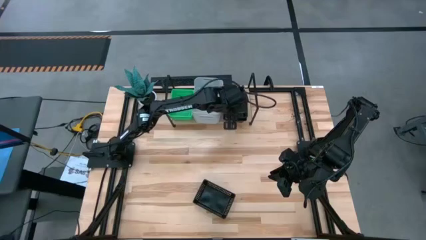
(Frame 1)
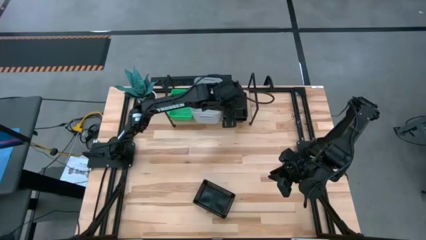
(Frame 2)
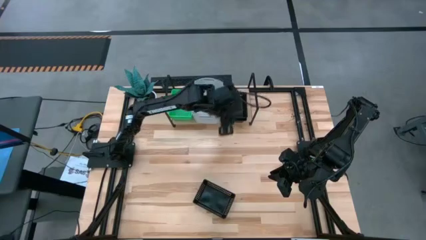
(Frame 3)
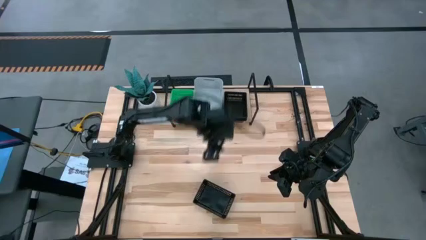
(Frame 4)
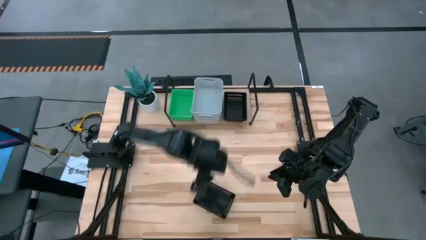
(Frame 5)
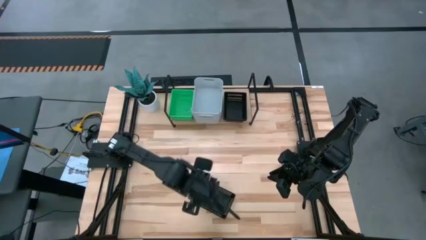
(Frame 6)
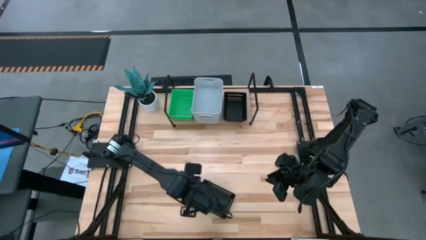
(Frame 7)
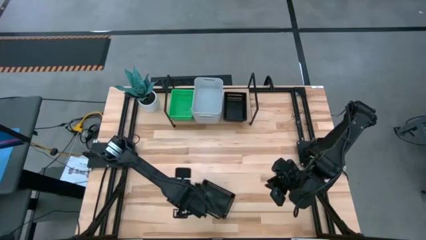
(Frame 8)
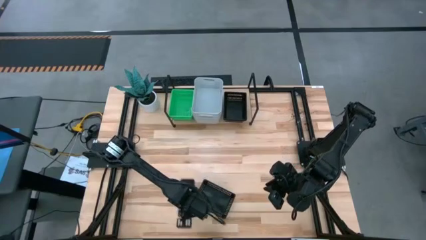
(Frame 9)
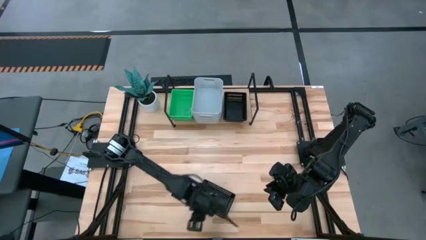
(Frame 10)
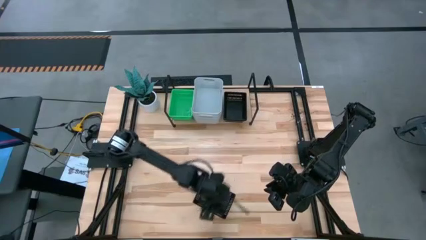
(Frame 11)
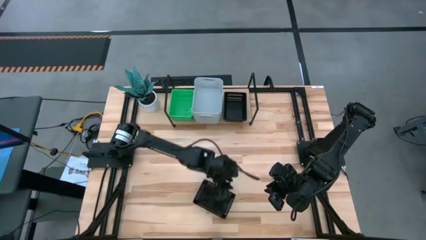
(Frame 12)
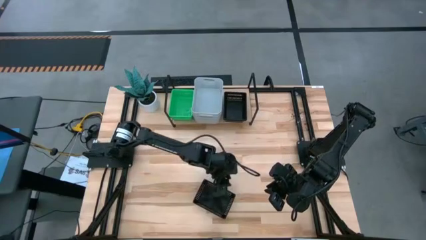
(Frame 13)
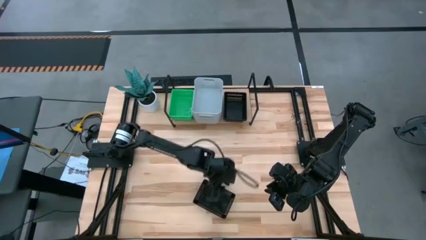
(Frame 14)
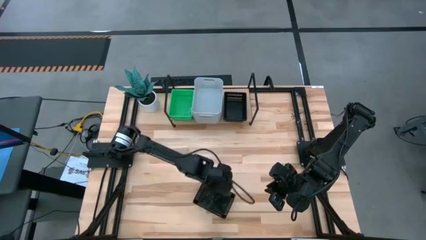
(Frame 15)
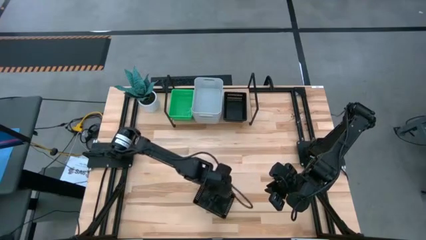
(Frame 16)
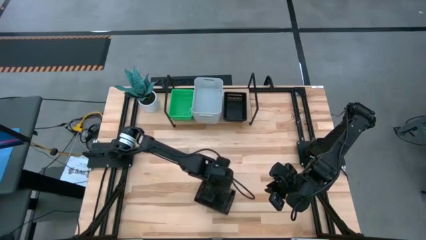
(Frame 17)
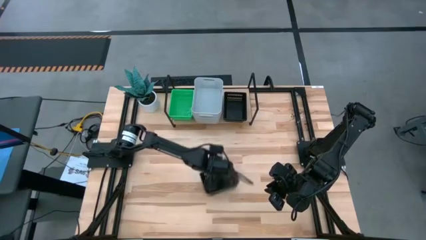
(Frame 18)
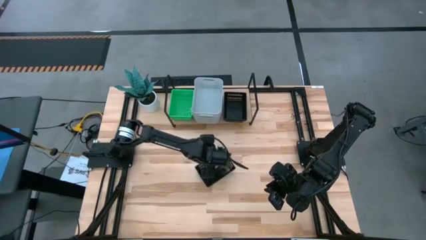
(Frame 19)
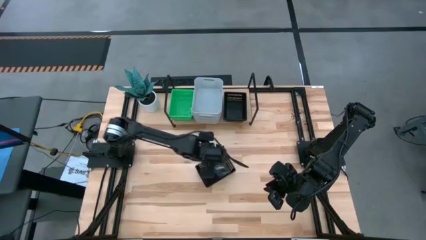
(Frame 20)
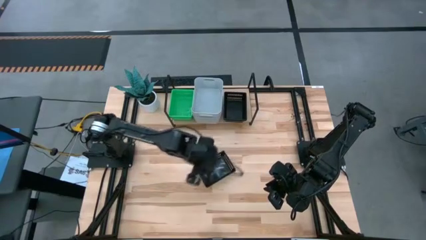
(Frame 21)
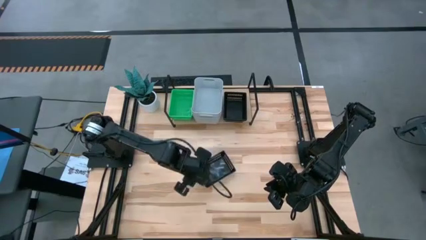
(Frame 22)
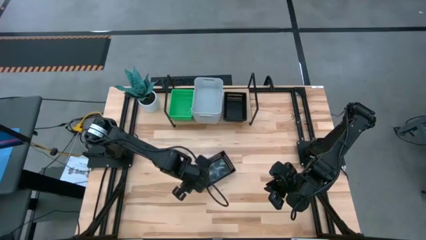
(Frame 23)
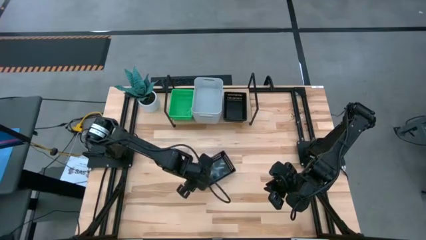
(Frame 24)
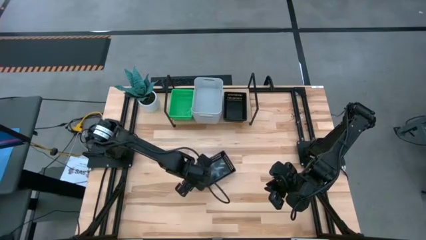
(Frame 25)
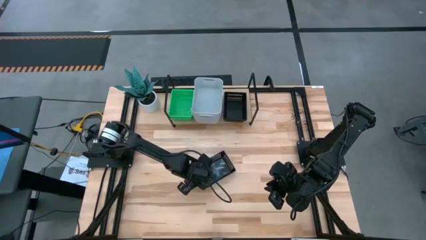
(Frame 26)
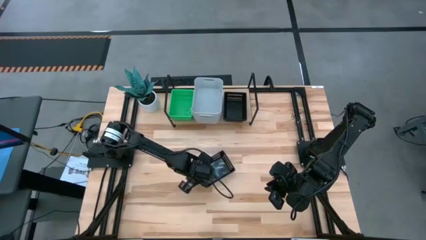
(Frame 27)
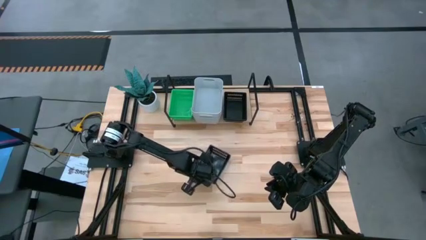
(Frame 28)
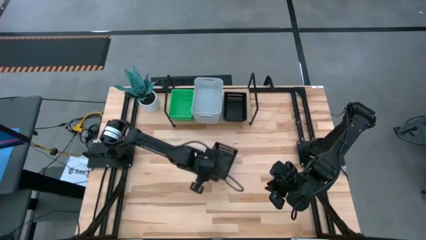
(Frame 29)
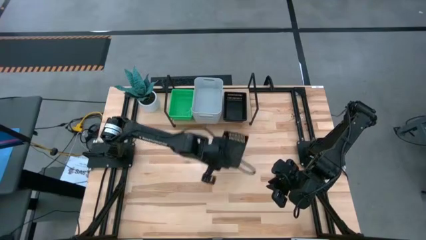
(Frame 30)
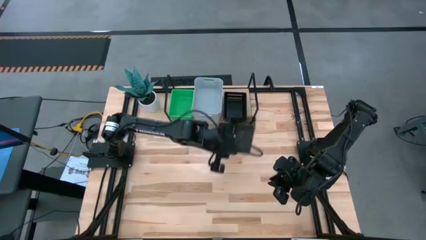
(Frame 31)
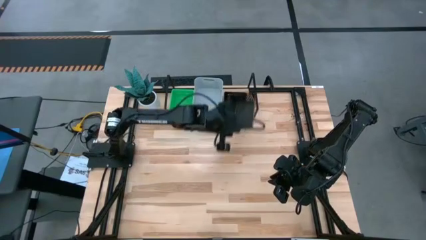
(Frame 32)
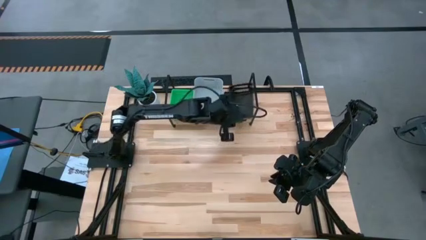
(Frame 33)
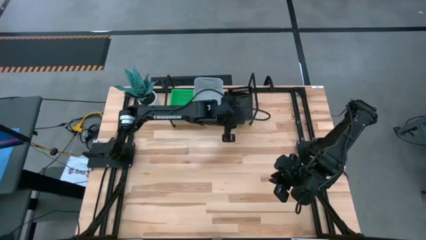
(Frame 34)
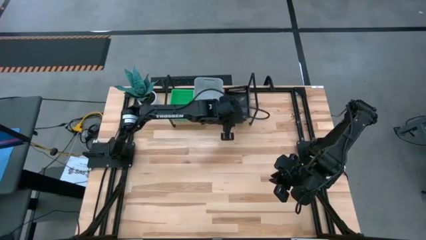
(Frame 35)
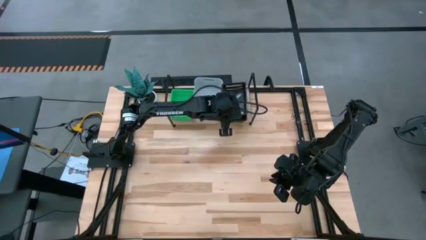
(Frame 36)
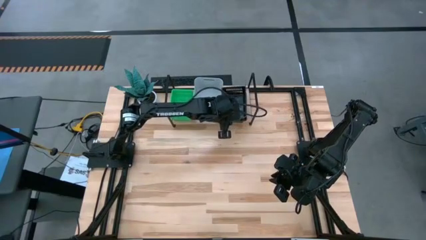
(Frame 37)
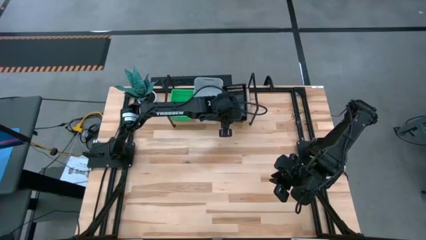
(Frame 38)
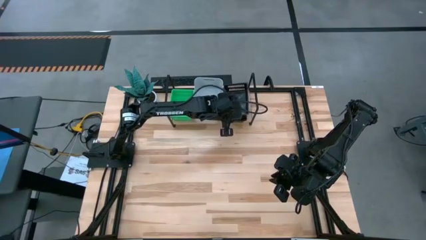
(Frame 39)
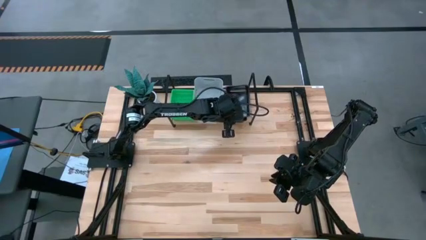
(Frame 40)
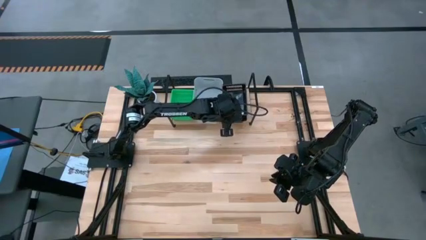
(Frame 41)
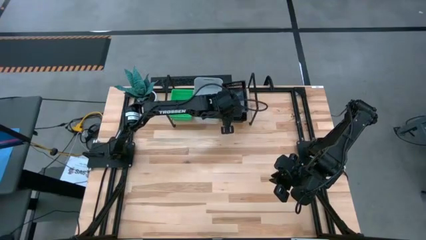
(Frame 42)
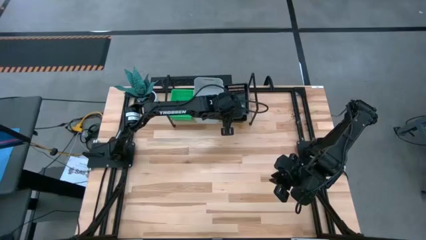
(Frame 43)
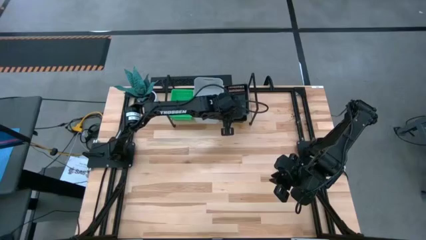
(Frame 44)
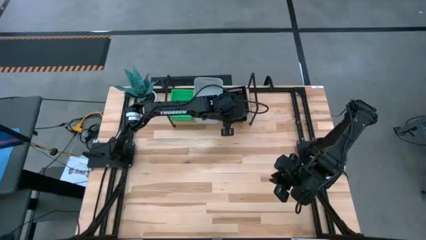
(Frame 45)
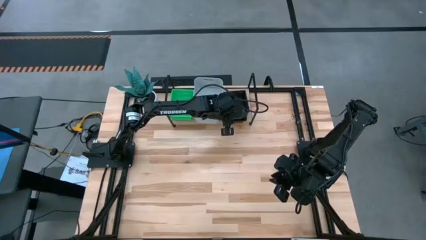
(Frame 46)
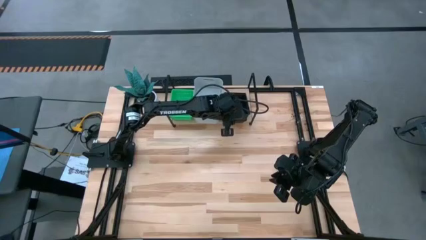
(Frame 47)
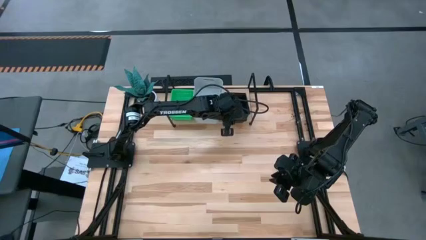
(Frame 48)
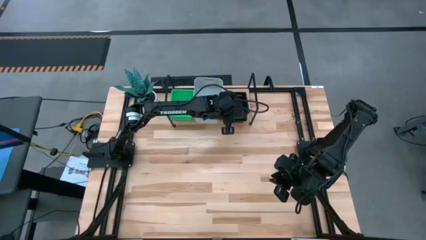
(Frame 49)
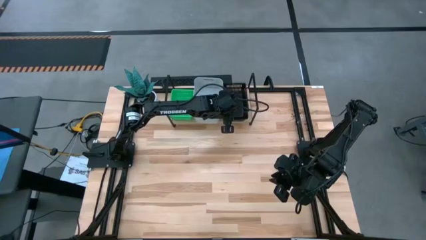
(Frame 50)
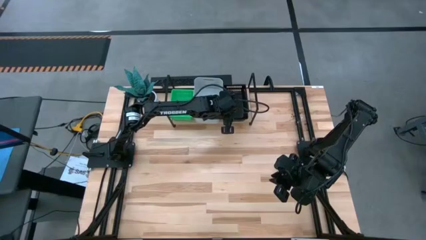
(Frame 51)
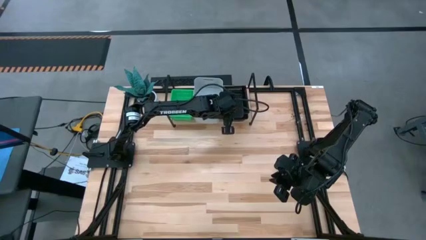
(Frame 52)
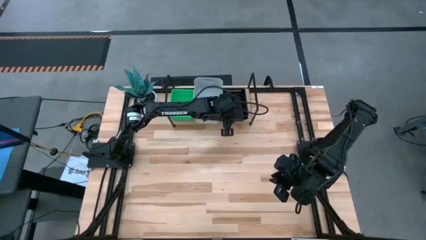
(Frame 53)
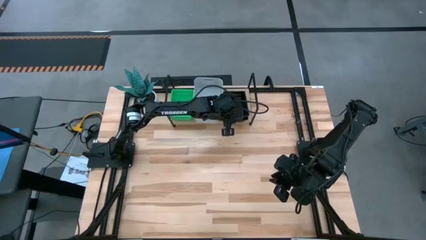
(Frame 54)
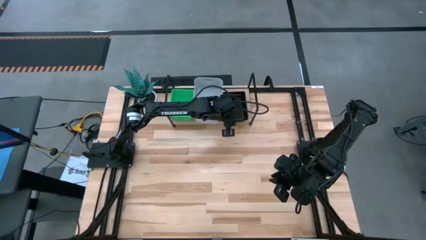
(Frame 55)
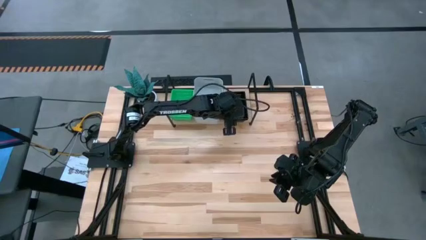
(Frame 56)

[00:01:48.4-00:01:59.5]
Task: Stack baskets on shelf by color
Stack the black bin on top of the black bin on the shelf

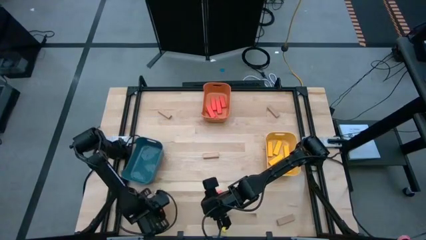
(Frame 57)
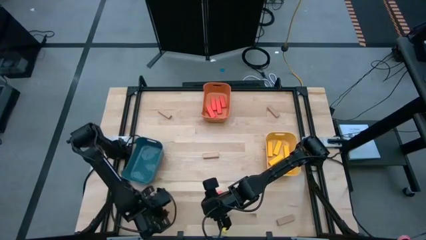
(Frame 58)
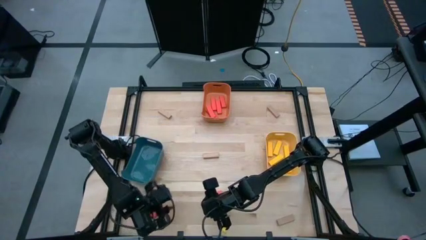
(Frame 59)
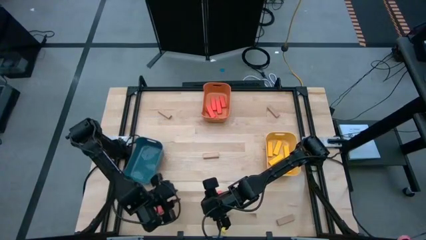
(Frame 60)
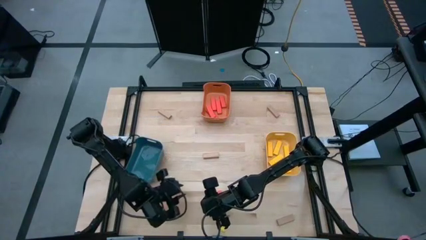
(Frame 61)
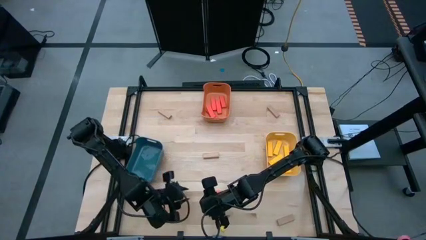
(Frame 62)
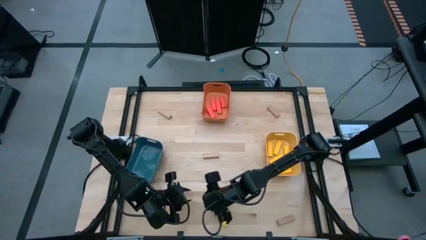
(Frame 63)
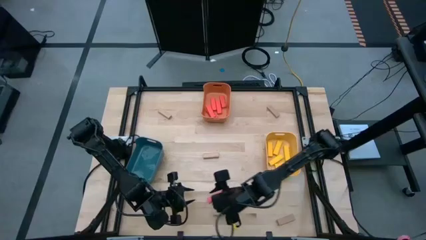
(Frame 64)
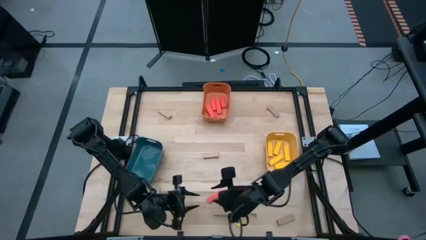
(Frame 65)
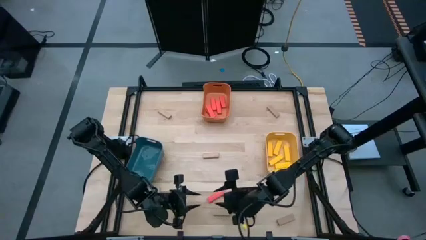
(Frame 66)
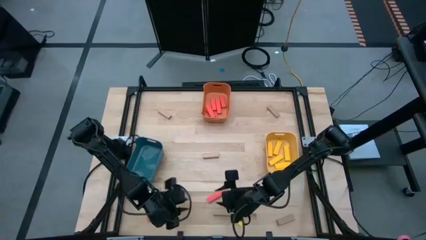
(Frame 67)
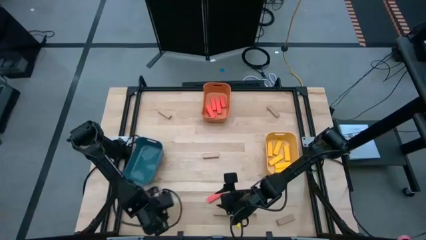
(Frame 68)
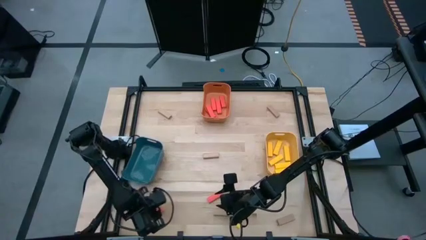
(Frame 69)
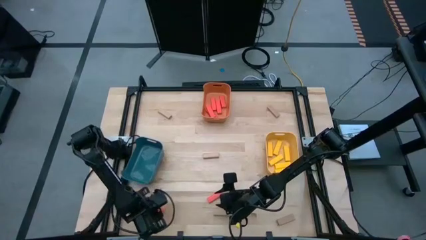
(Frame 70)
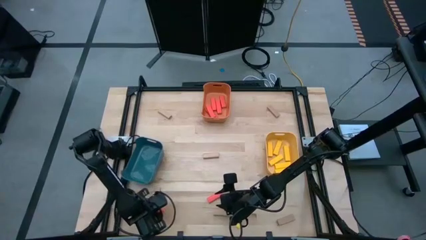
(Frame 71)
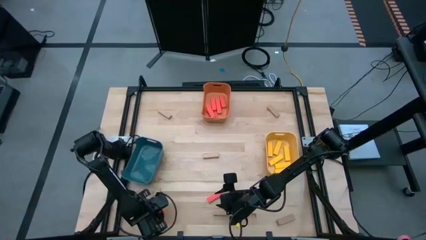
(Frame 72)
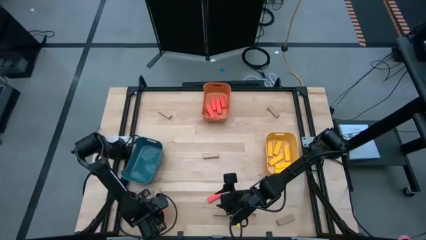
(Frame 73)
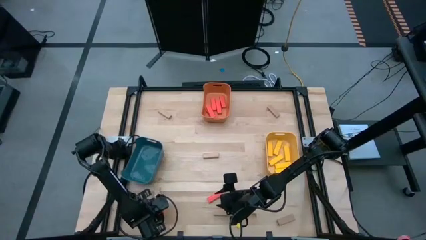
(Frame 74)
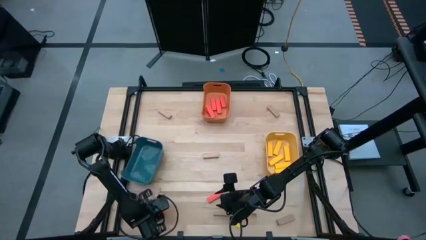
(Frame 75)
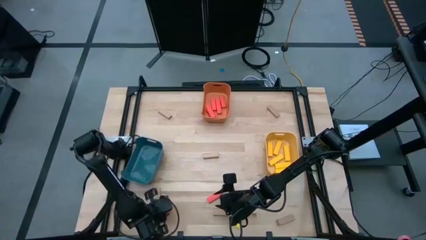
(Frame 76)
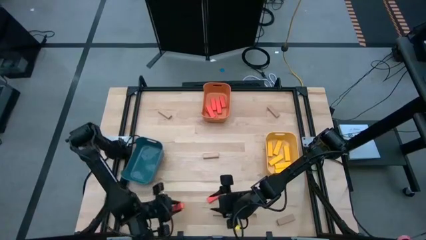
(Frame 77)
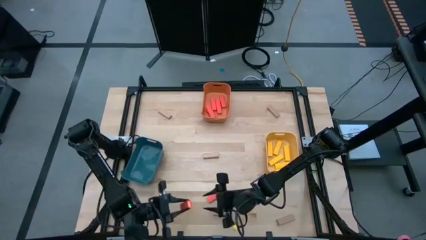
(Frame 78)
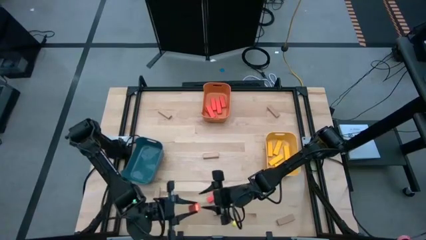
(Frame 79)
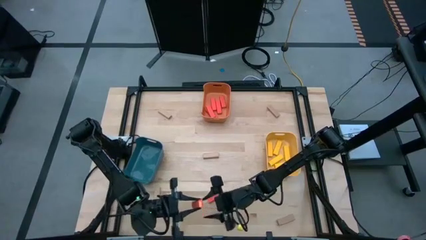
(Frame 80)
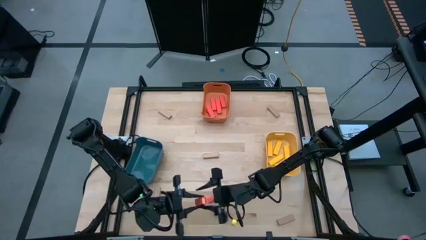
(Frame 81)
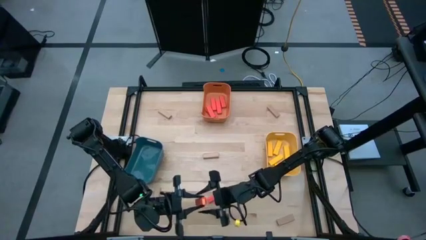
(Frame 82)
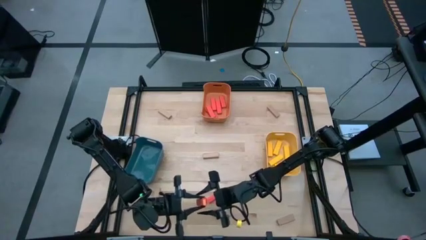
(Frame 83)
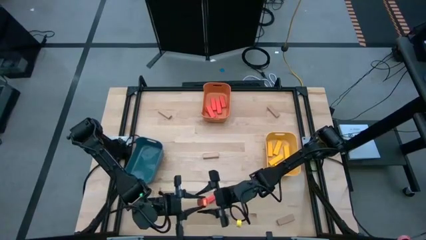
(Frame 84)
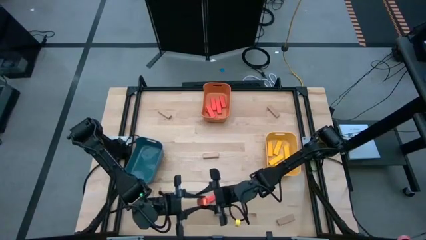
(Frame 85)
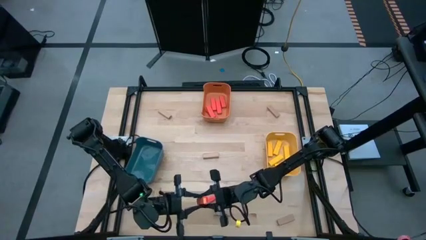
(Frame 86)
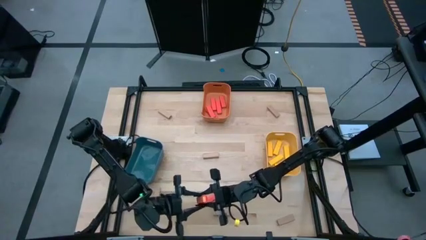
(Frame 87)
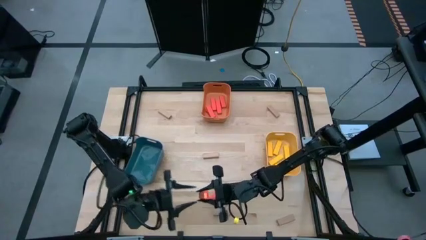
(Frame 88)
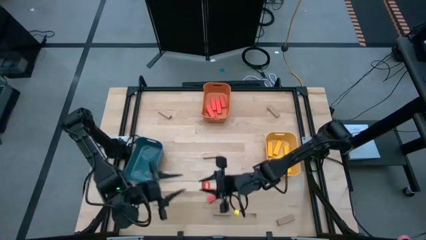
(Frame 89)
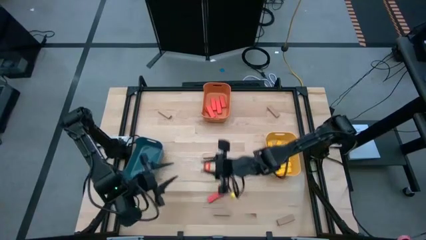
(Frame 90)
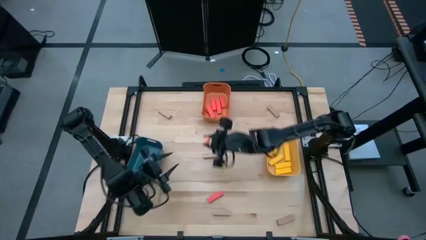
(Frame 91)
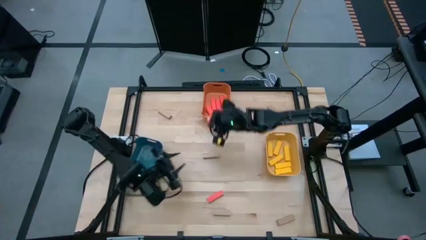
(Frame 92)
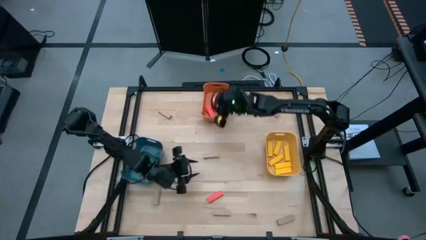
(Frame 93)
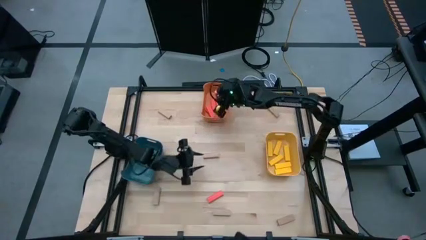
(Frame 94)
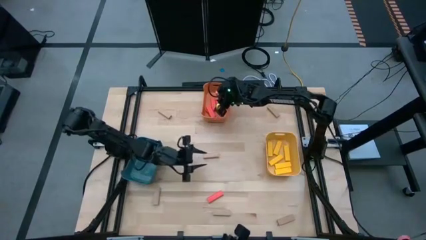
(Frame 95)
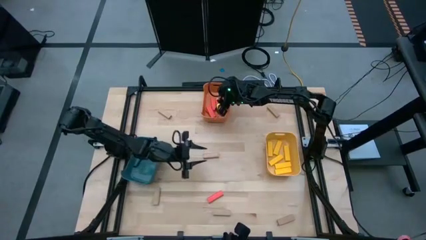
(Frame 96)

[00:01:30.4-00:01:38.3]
Task: Sort blocks
Put the left orange block into the orange bin
